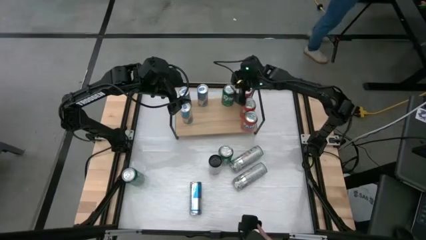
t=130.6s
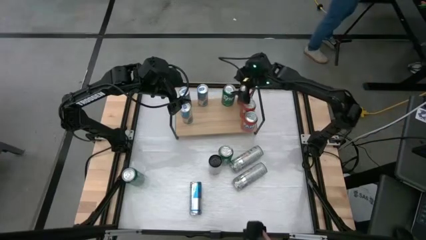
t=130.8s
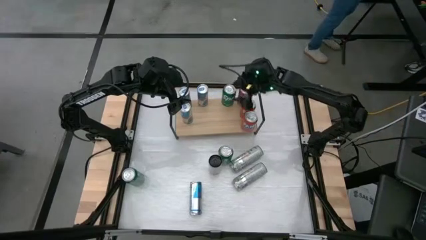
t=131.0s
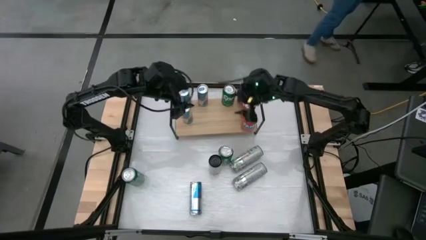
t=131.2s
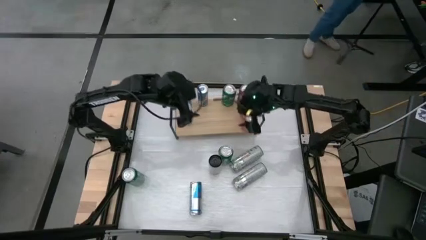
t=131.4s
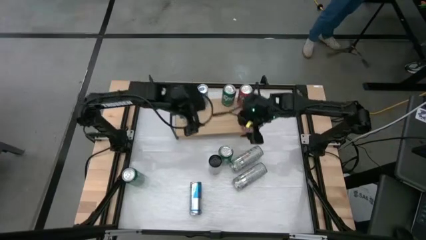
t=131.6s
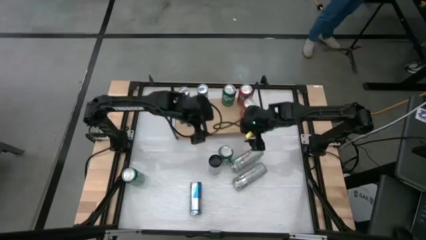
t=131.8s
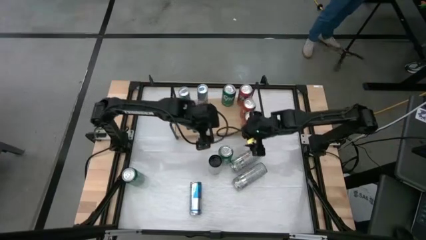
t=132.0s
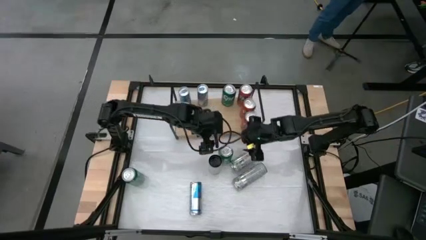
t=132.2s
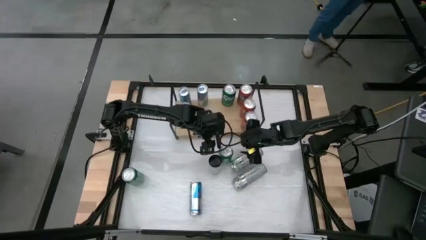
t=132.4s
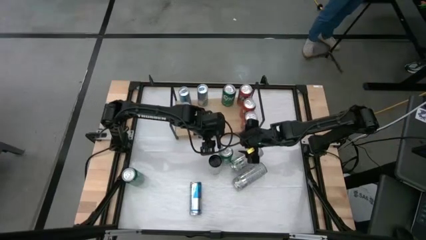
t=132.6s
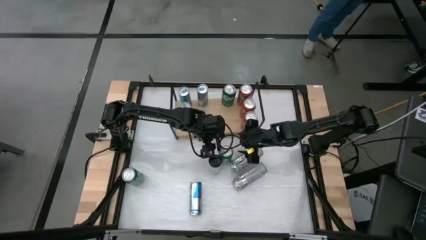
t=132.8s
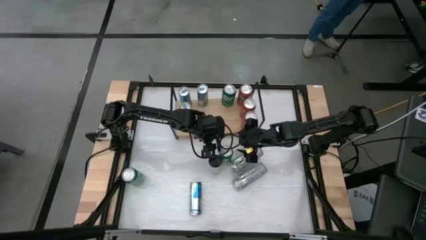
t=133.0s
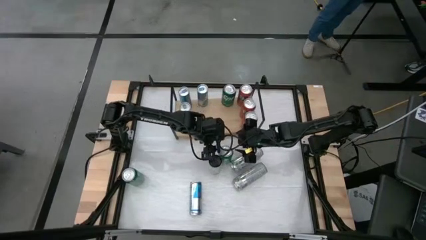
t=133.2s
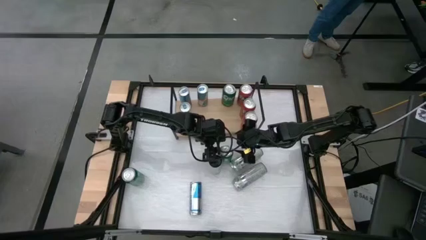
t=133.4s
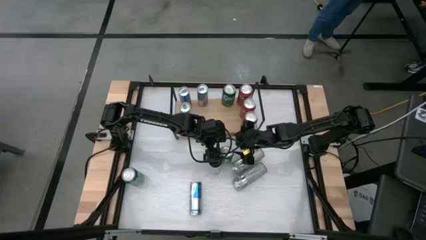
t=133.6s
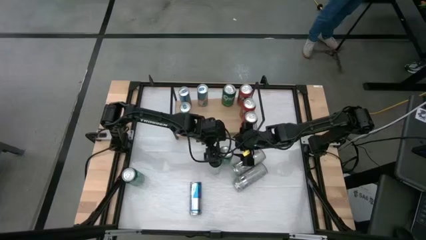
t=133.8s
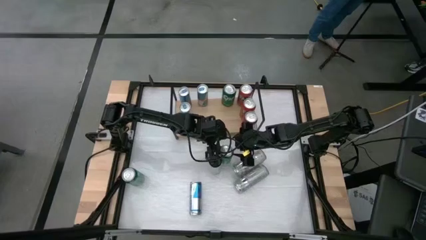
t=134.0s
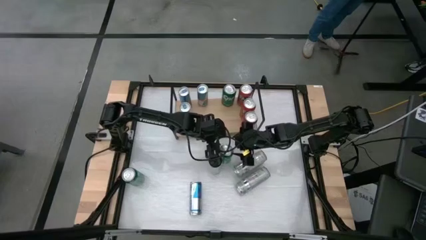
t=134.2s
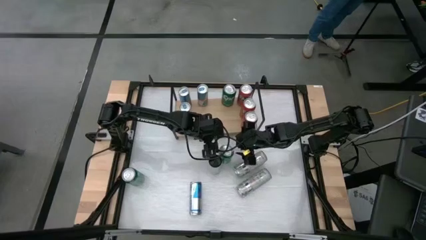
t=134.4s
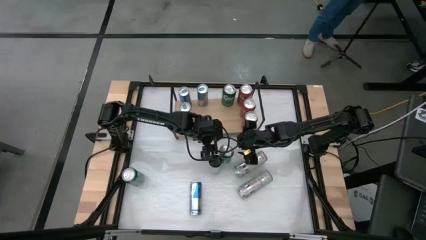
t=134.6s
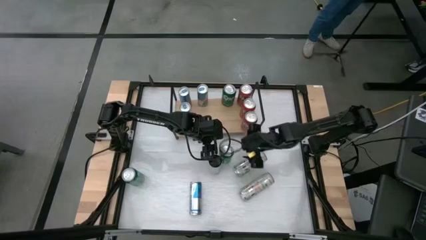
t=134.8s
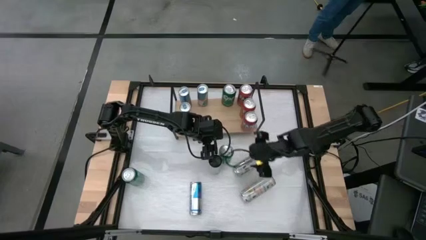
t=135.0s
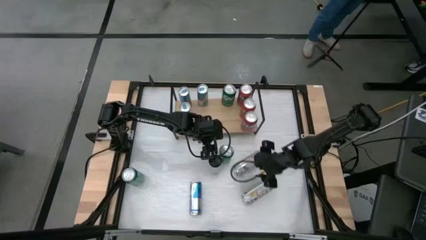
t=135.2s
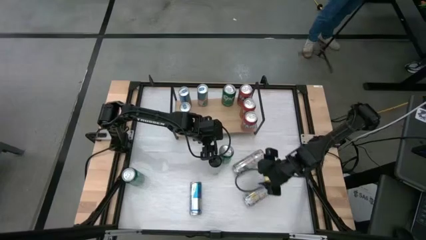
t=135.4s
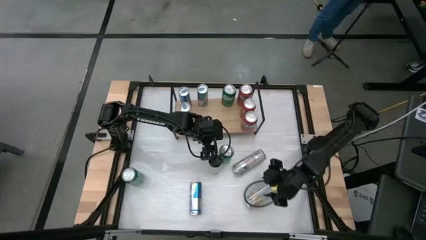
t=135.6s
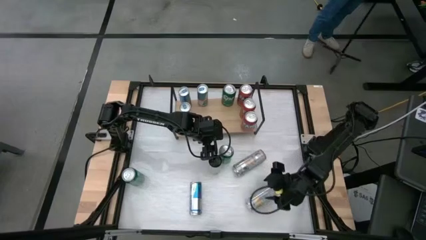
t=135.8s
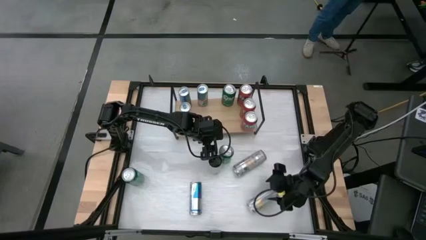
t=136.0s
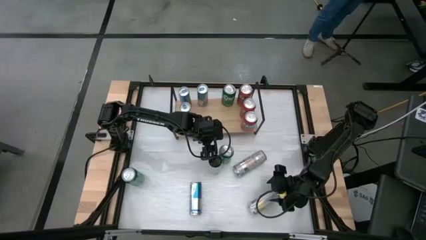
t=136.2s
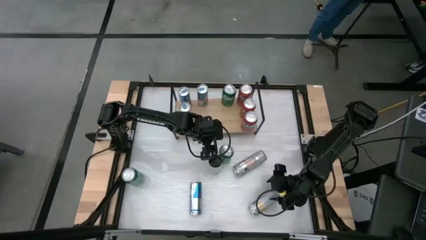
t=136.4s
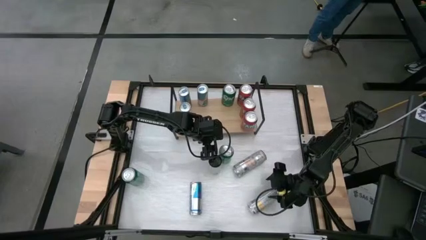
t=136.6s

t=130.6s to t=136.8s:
Task: Sort soda cans
Put the green soda can on the shelf and align with the other green soda cans

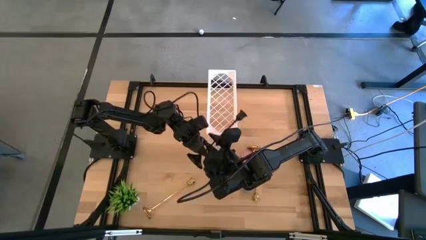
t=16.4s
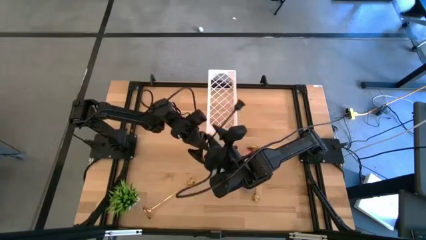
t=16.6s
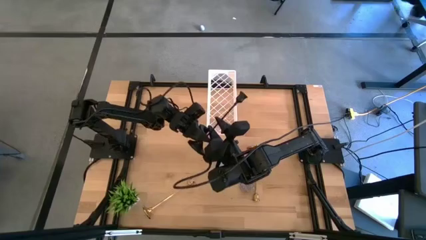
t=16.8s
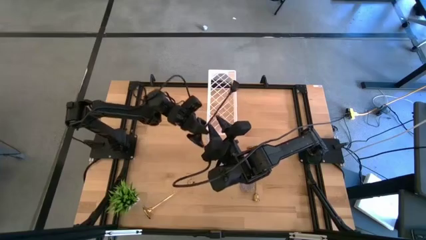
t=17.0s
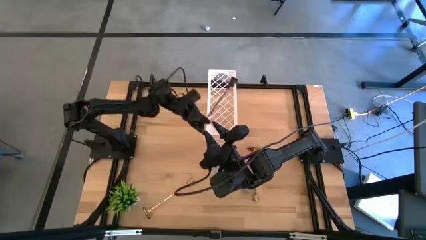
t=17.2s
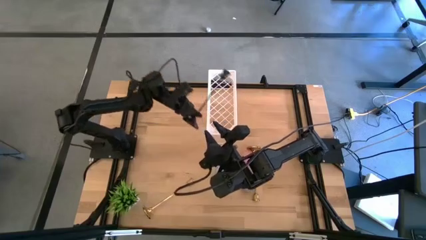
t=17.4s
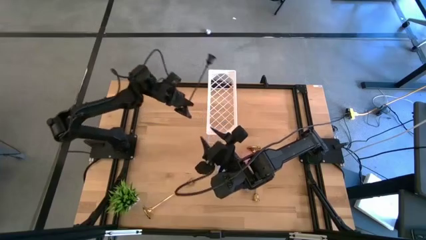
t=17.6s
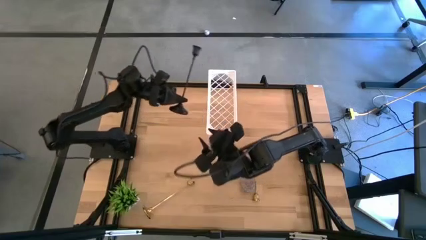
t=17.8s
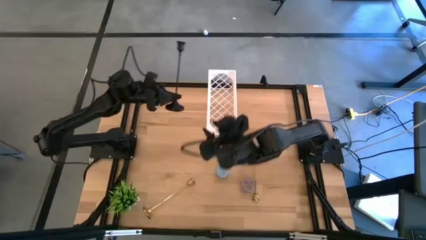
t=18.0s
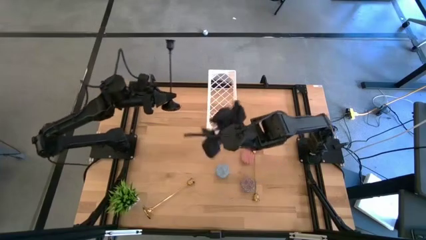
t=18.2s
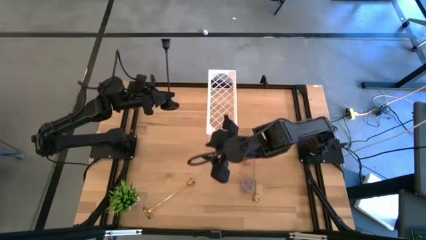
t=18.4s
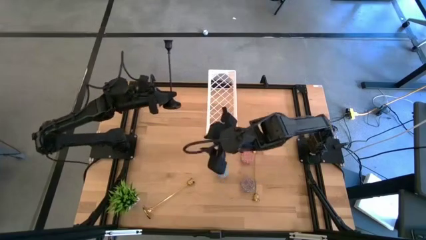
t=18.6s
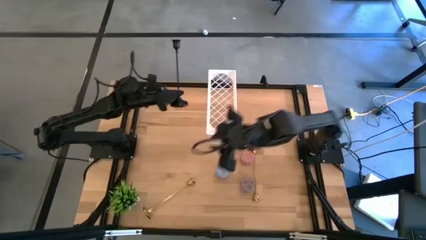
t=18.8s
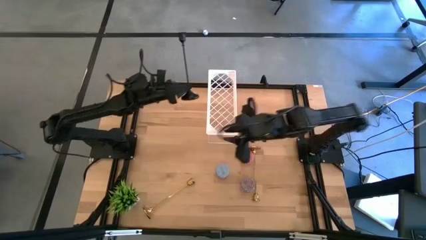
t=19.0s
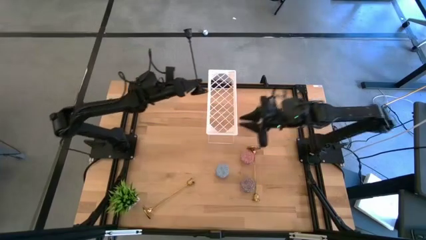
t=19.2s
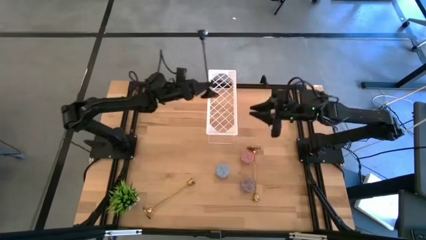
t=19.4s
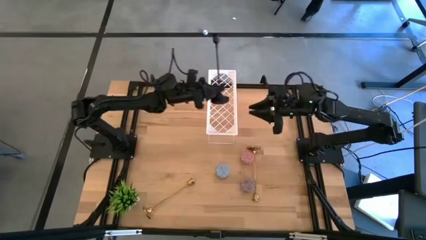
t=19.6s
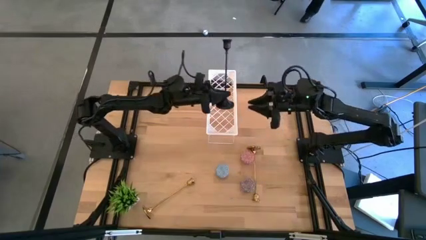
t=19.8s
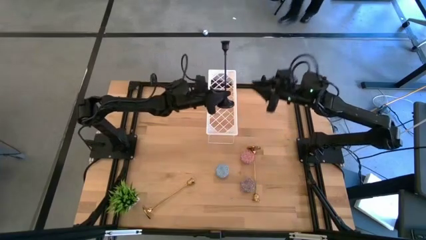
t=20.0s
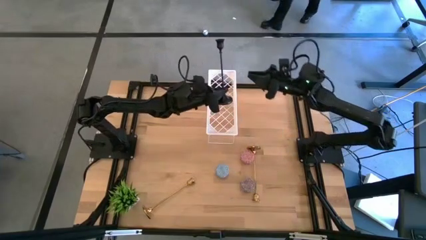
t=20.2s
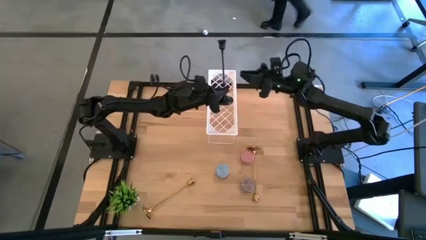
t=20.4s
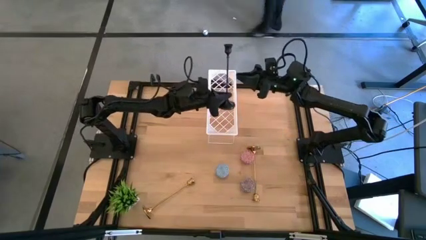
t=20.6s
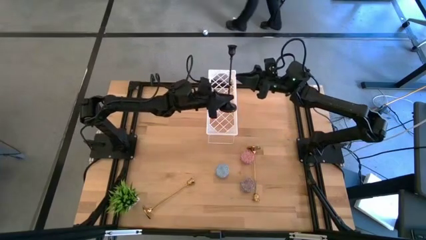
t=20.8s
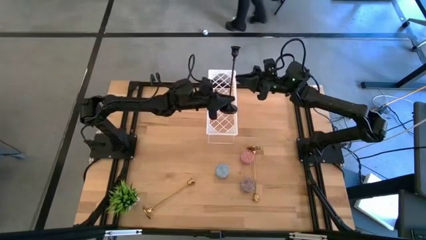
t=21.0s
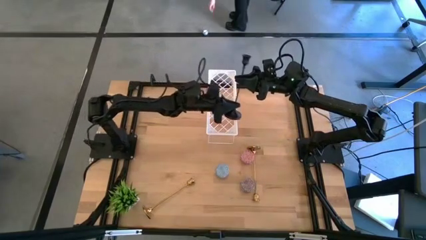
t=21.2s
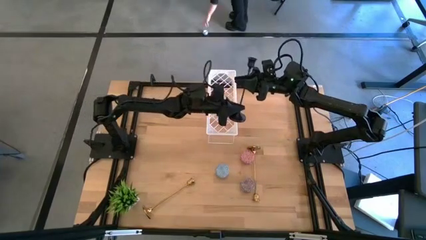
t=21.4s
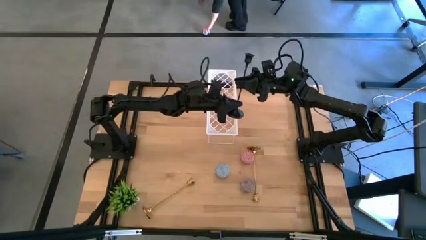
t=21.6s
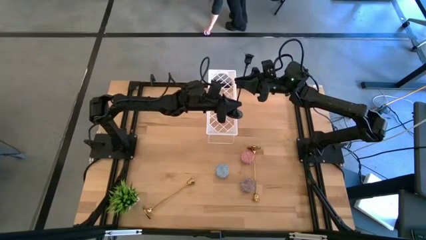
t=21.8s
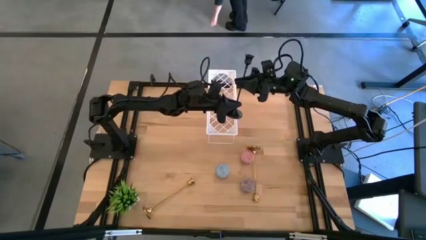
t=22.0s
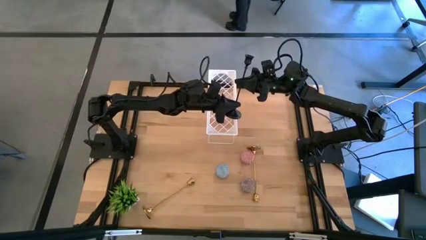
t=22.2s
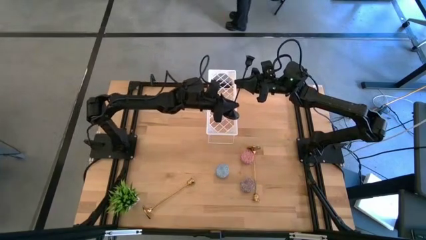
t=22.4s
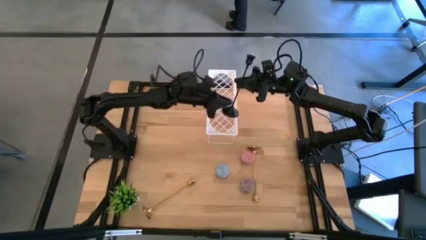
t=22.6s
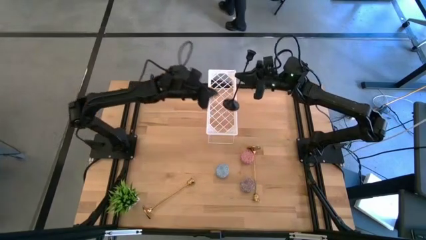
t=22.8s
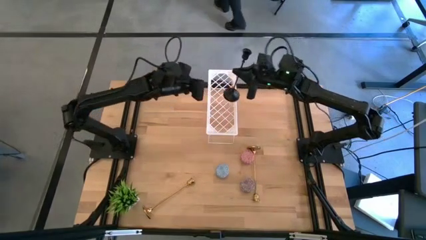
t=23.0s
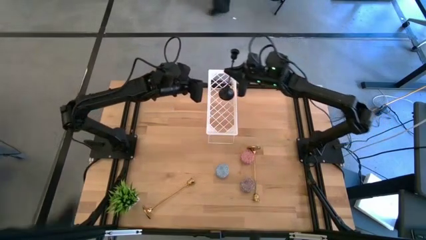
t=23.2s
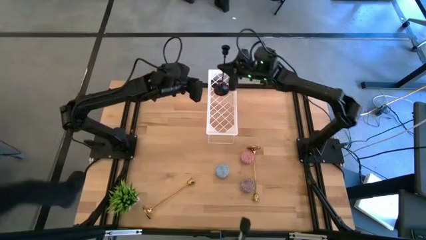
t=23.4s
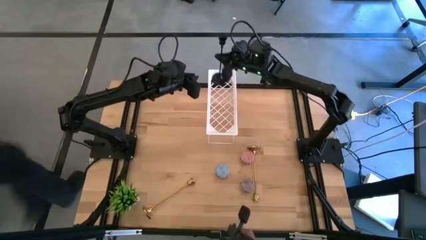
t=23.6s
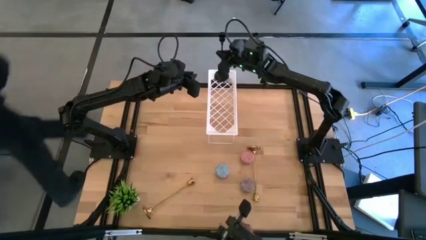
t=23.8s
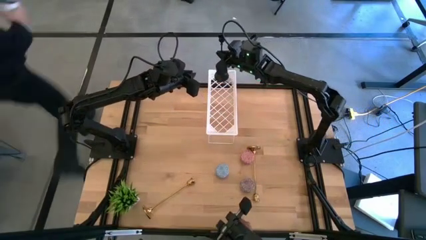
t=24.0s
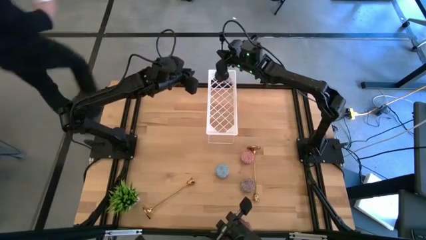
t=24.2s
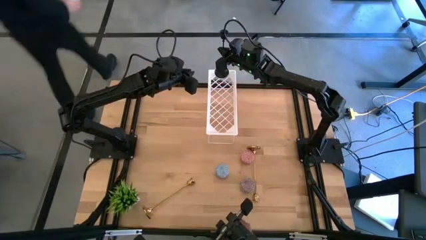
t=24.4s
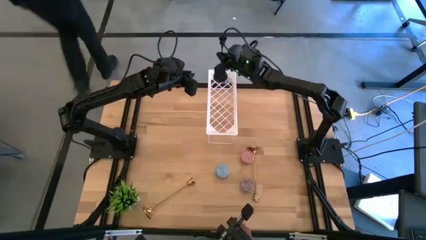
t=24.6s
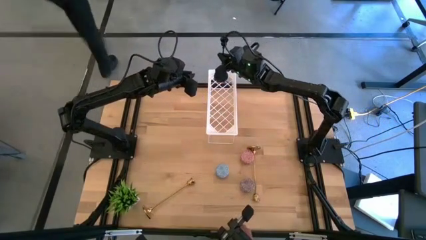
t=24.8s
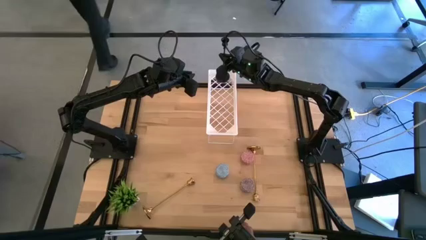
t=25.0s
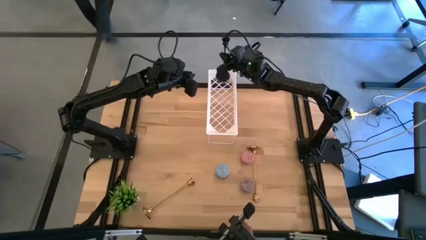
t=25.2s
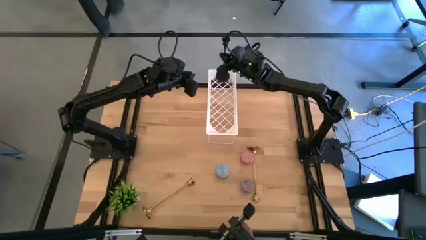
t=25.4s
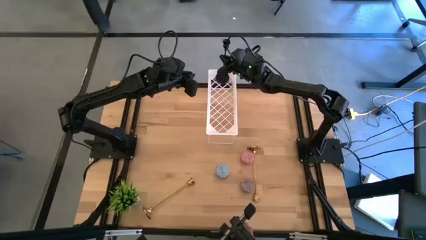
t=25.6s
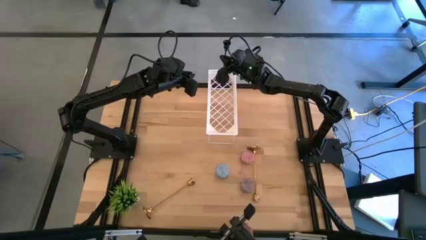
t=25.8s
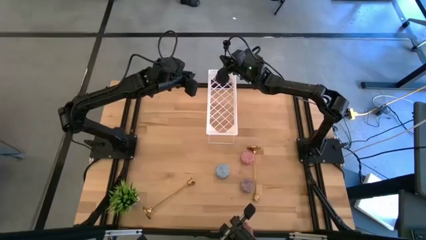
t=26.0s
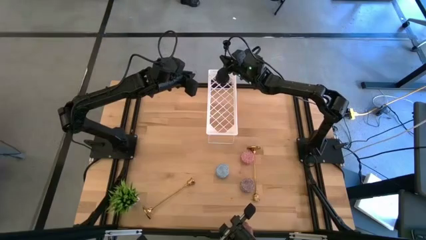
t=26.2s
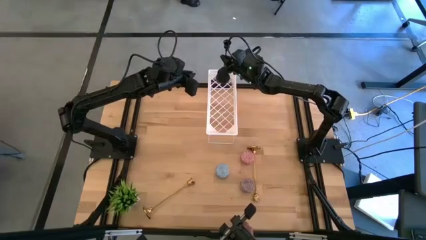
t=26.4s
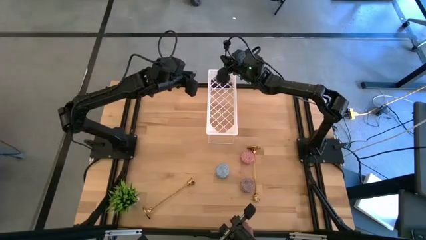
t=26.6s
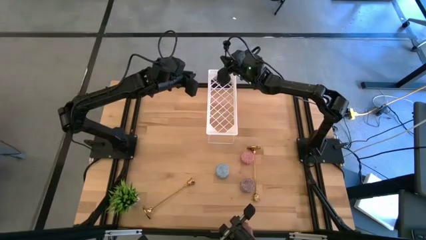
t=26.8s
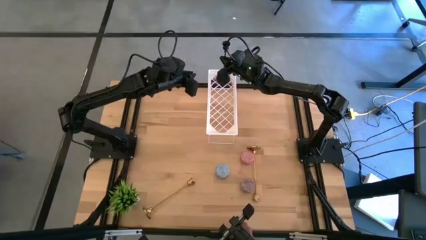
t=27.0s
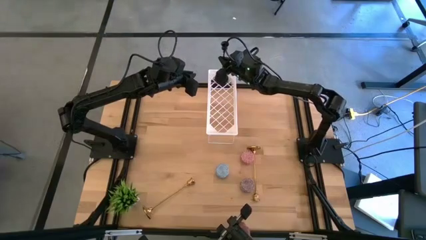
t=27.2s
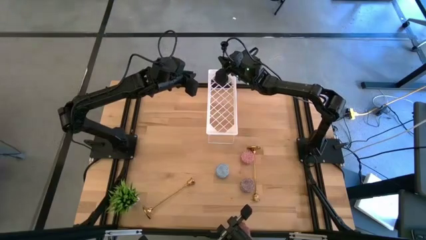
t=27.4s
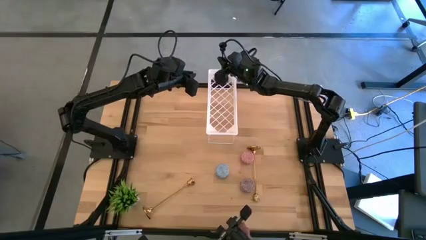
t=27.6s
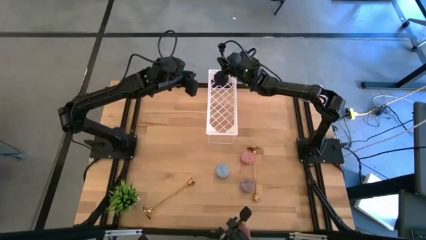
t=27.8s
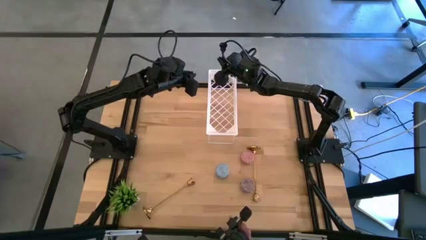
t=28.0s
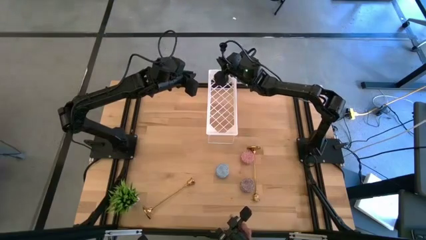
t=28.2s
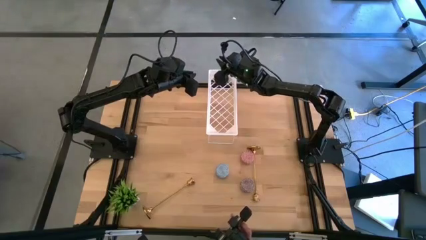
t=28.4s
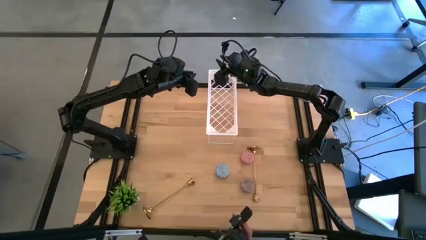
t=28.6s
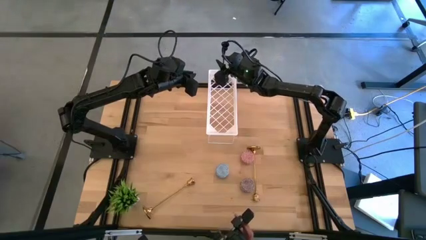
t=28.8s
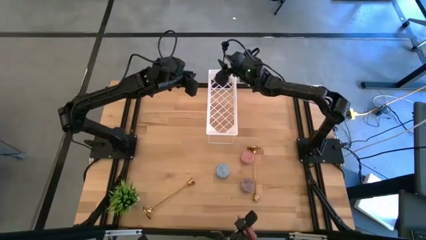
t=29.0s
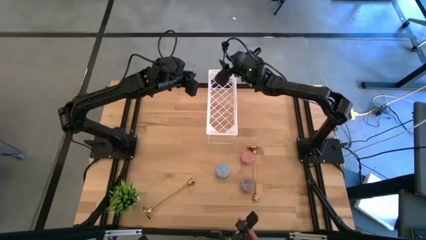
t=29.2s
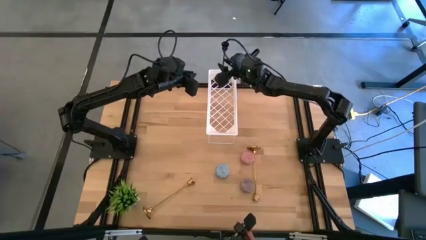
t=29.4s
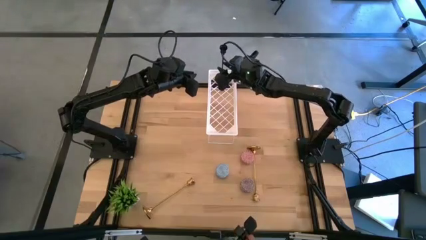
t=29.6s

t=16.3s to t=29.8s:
Task: Pick & Place candle stick holders
Put the black candle holder on the shelf
